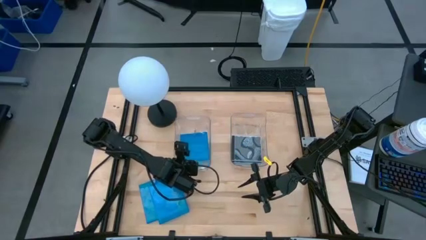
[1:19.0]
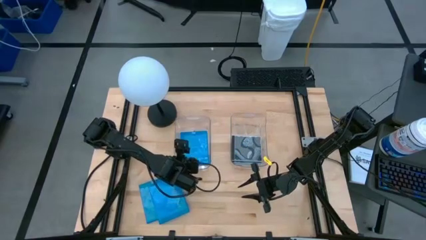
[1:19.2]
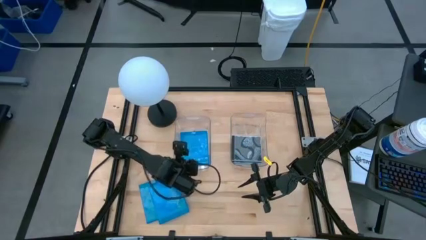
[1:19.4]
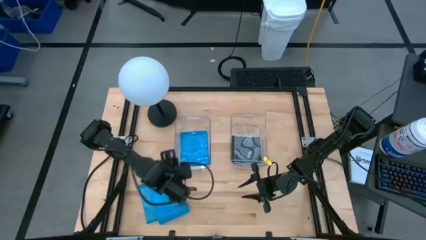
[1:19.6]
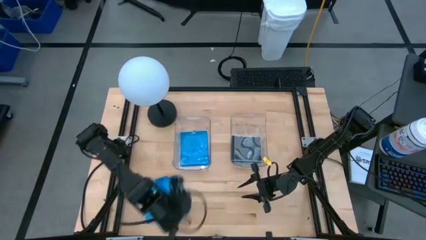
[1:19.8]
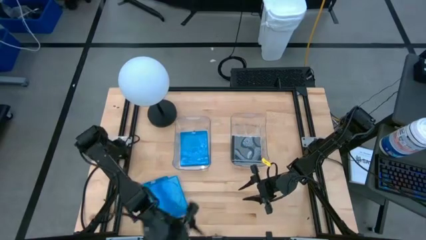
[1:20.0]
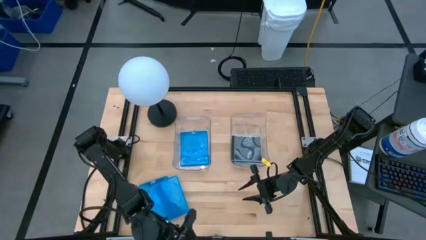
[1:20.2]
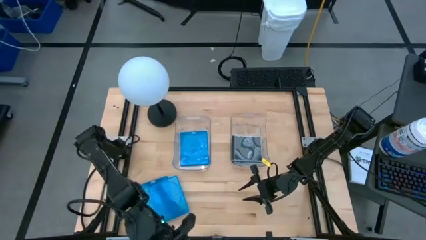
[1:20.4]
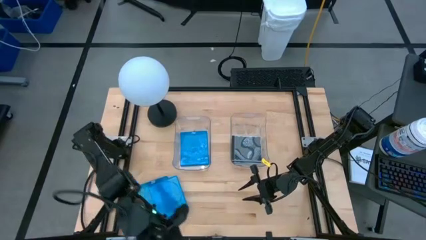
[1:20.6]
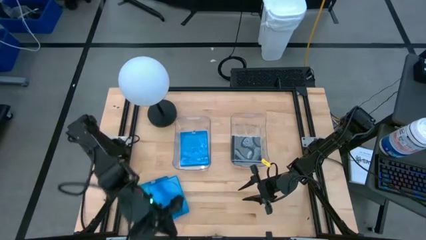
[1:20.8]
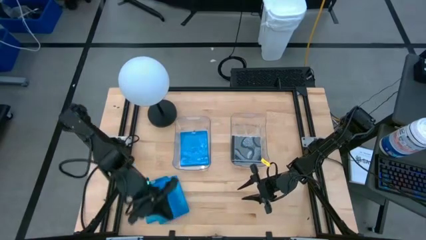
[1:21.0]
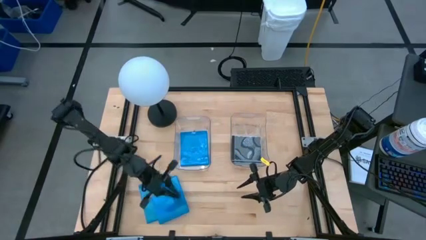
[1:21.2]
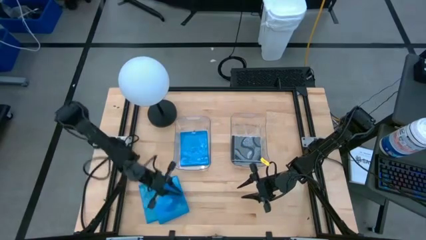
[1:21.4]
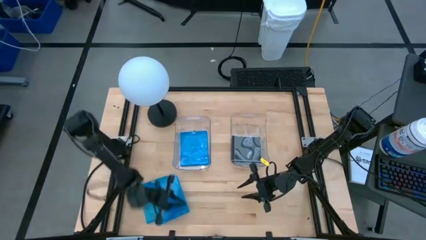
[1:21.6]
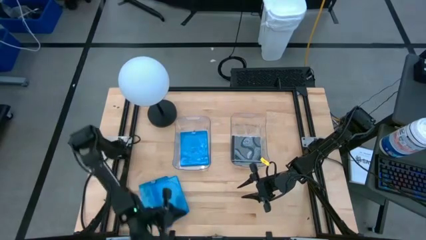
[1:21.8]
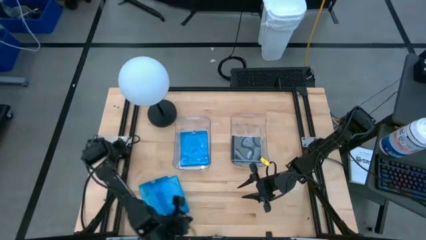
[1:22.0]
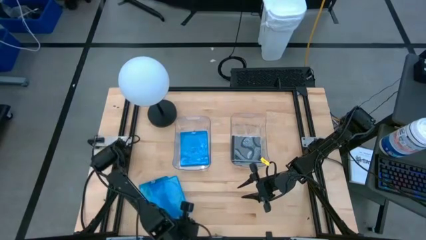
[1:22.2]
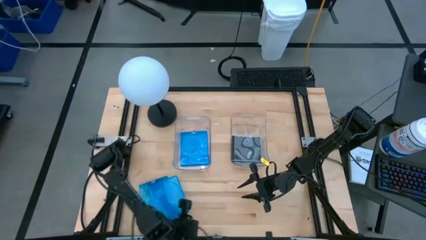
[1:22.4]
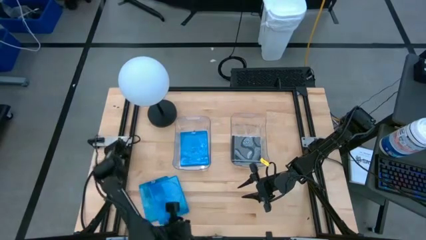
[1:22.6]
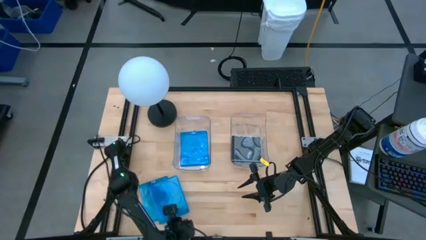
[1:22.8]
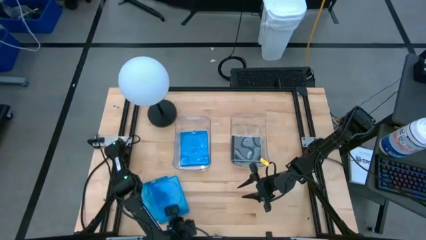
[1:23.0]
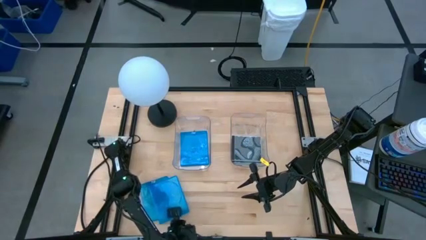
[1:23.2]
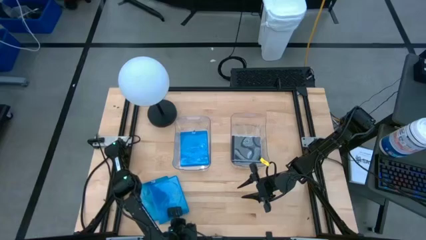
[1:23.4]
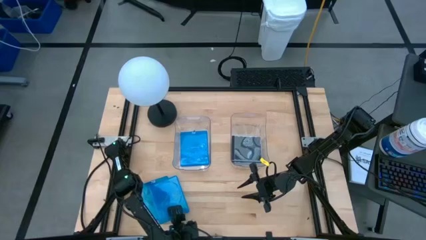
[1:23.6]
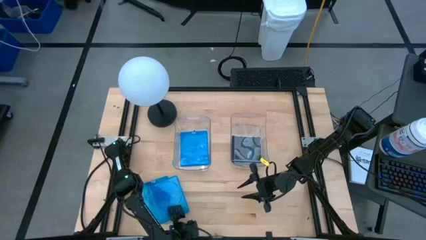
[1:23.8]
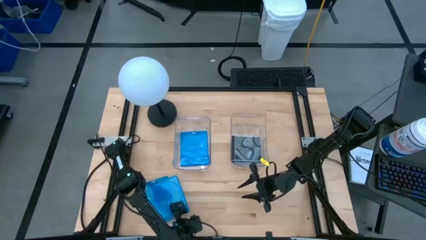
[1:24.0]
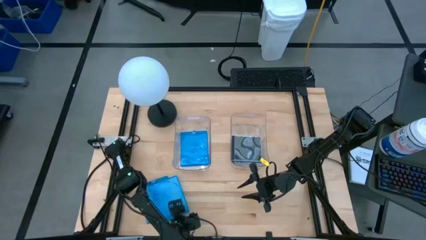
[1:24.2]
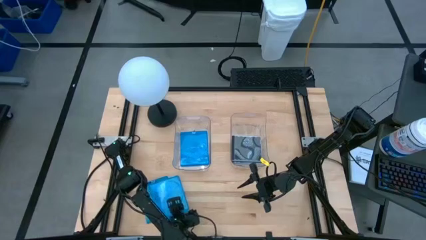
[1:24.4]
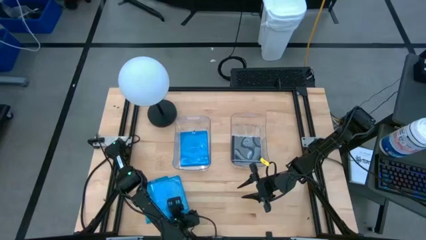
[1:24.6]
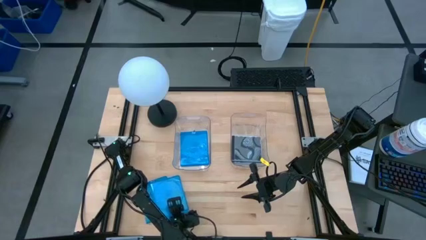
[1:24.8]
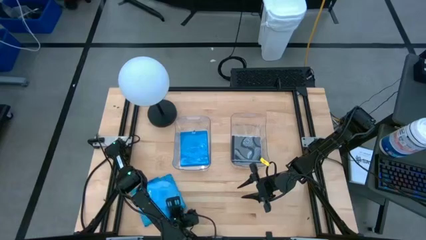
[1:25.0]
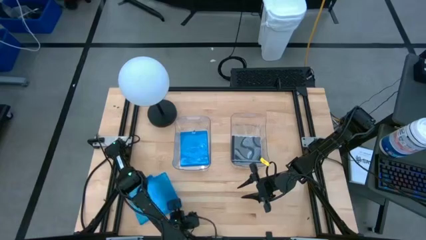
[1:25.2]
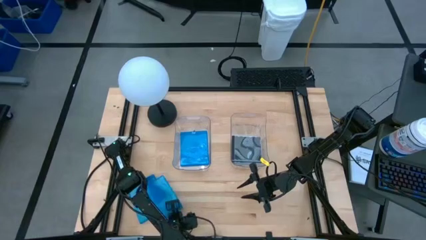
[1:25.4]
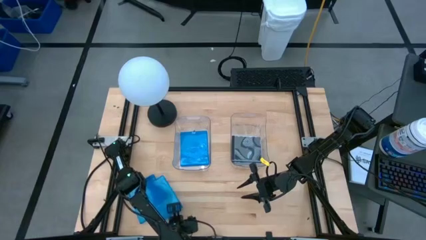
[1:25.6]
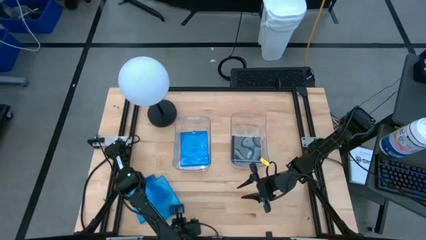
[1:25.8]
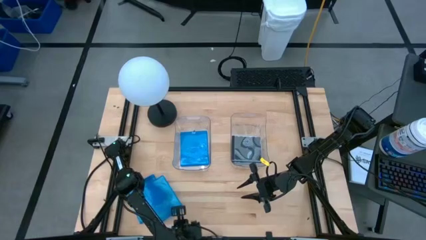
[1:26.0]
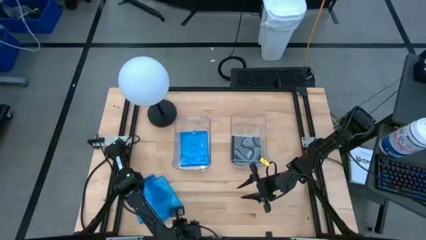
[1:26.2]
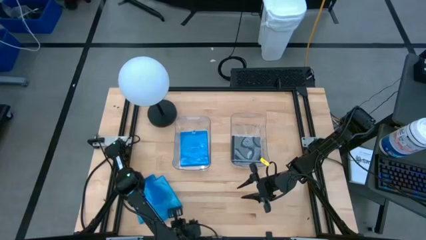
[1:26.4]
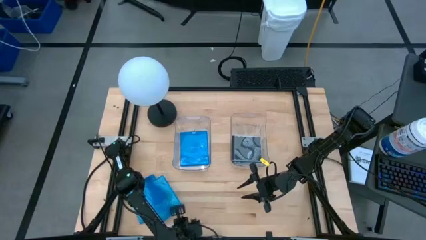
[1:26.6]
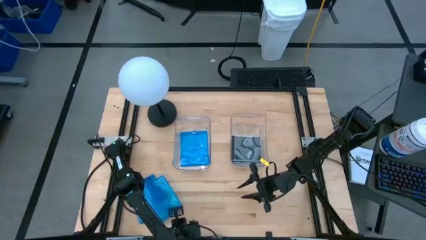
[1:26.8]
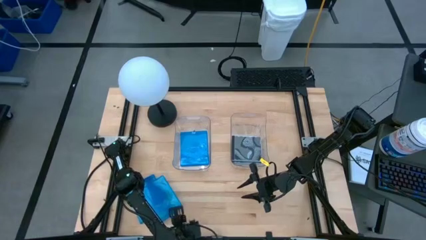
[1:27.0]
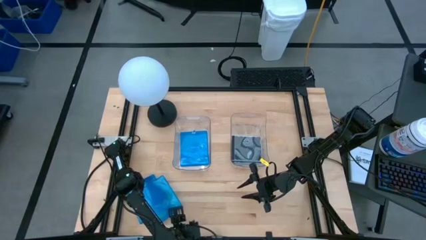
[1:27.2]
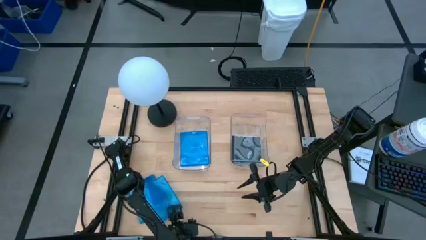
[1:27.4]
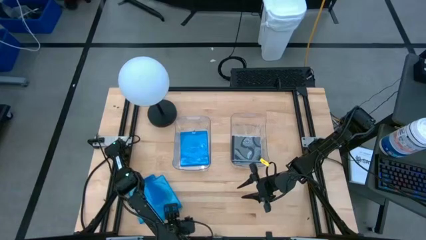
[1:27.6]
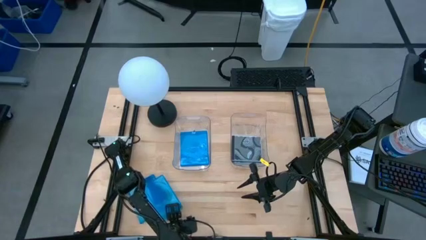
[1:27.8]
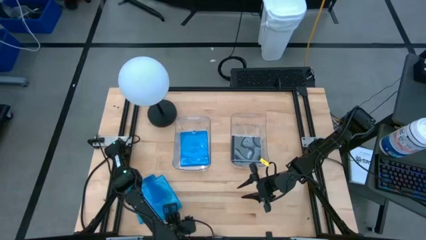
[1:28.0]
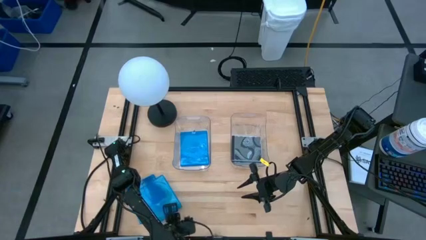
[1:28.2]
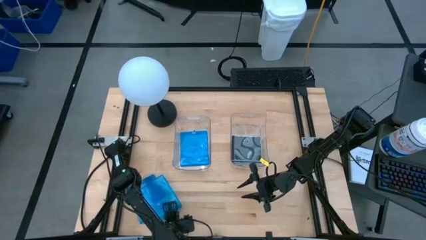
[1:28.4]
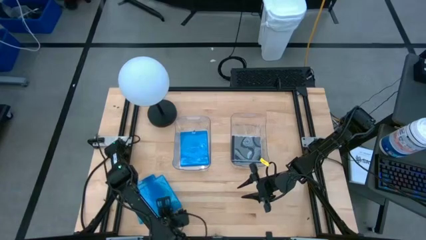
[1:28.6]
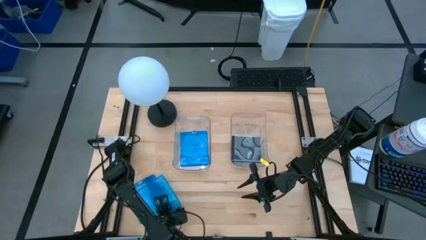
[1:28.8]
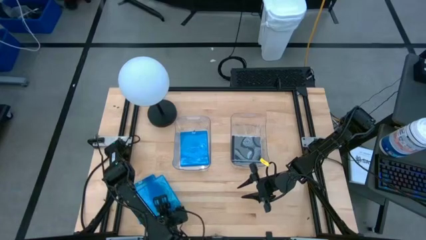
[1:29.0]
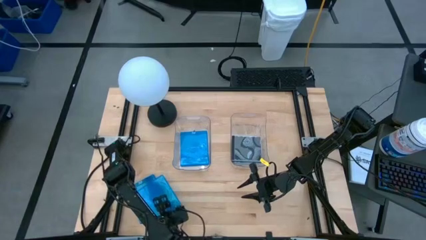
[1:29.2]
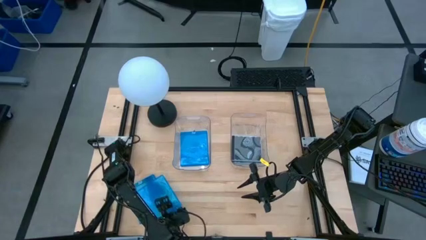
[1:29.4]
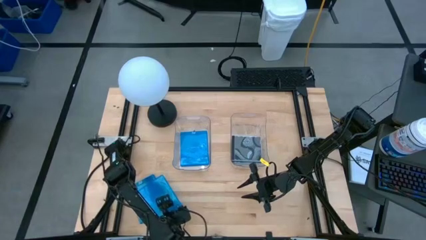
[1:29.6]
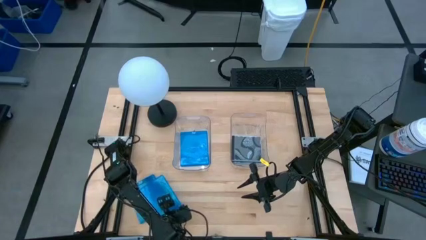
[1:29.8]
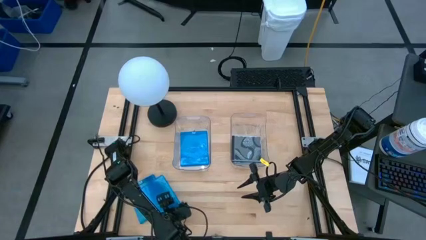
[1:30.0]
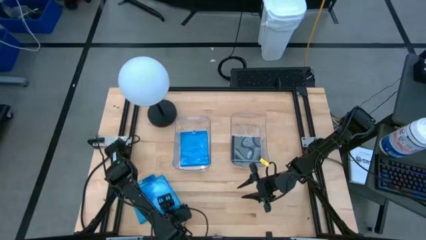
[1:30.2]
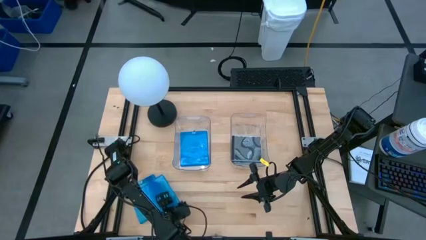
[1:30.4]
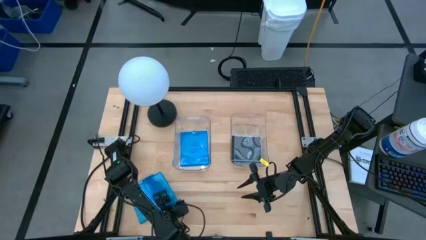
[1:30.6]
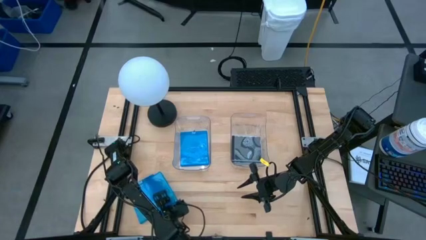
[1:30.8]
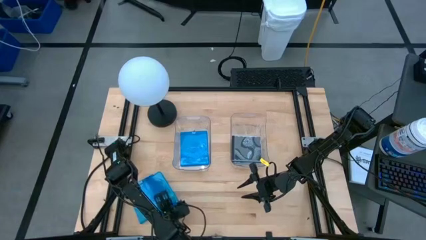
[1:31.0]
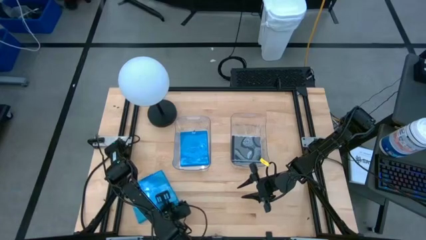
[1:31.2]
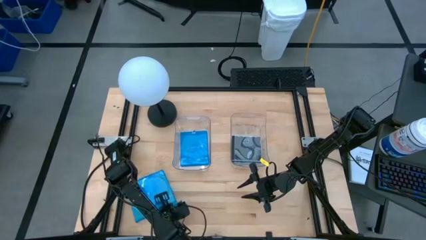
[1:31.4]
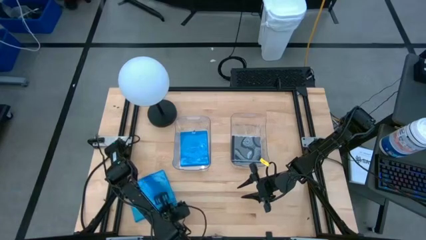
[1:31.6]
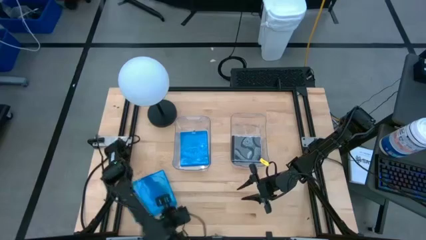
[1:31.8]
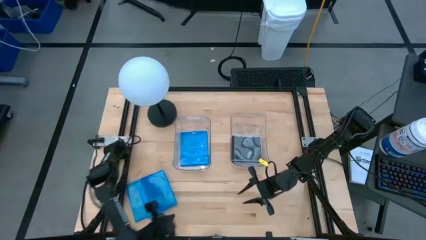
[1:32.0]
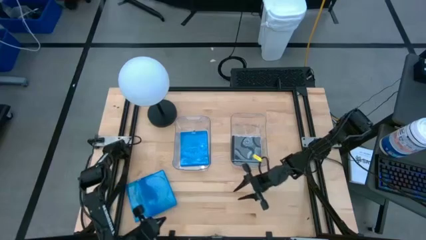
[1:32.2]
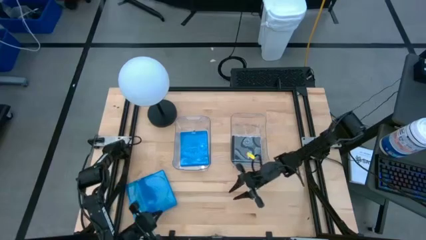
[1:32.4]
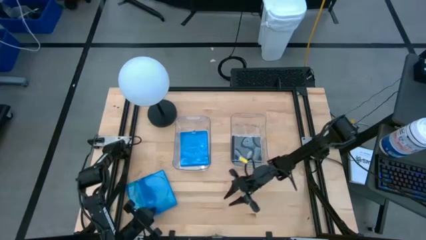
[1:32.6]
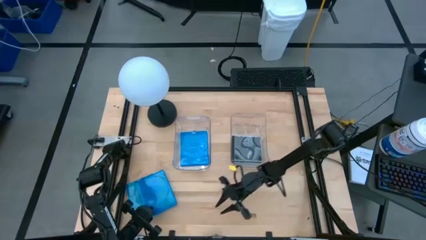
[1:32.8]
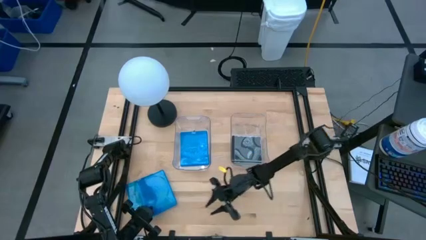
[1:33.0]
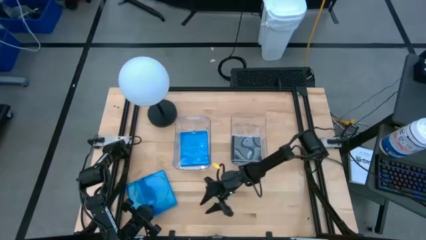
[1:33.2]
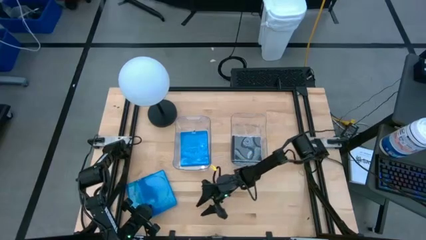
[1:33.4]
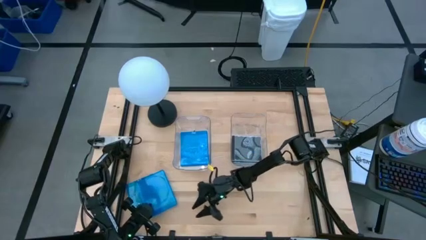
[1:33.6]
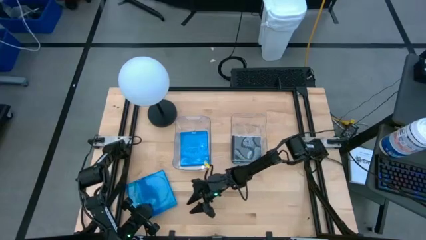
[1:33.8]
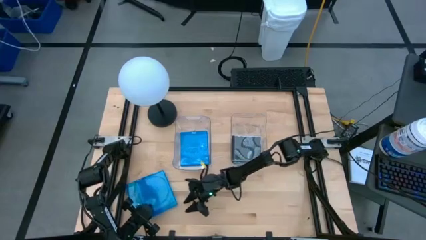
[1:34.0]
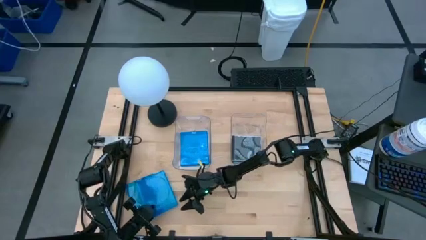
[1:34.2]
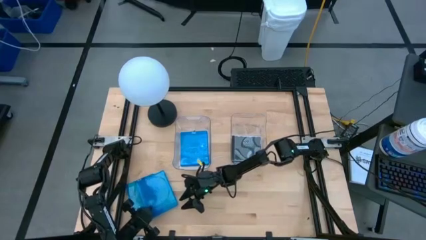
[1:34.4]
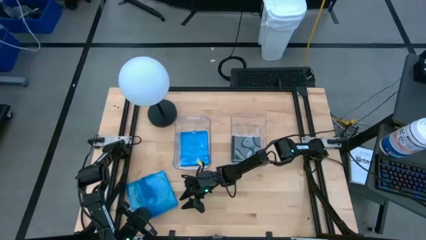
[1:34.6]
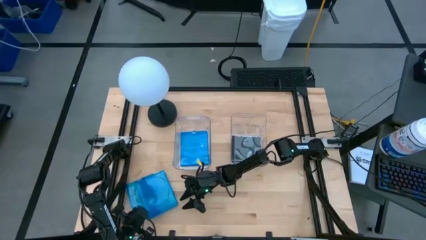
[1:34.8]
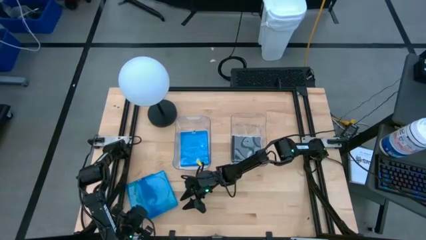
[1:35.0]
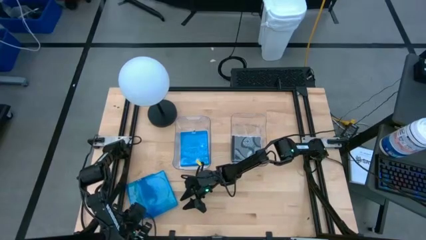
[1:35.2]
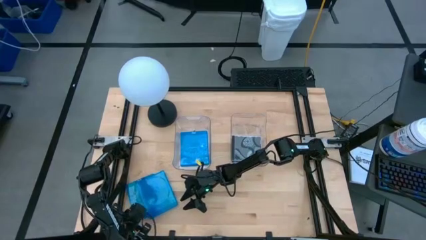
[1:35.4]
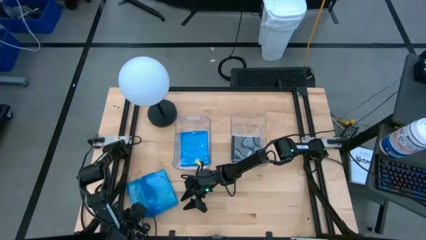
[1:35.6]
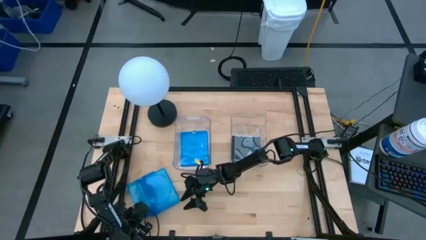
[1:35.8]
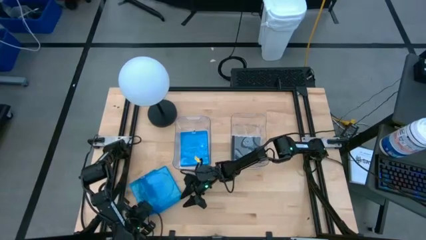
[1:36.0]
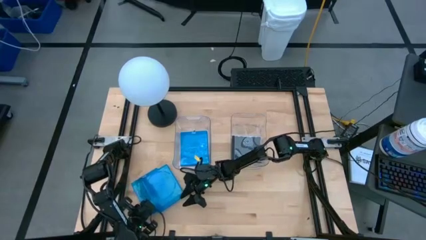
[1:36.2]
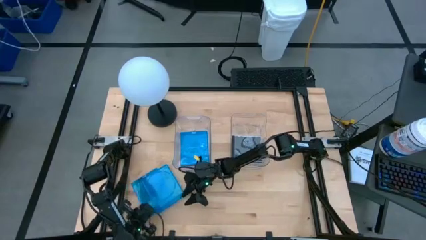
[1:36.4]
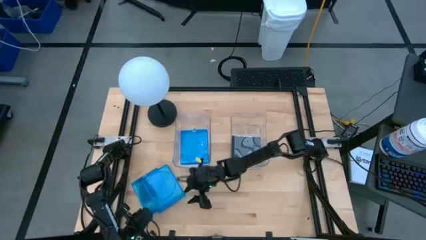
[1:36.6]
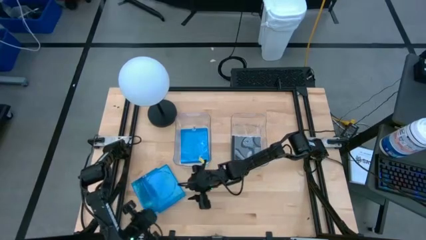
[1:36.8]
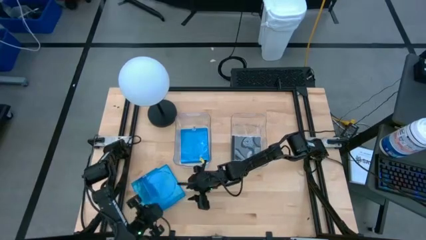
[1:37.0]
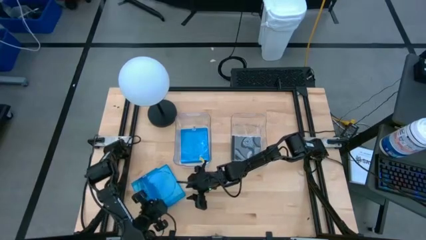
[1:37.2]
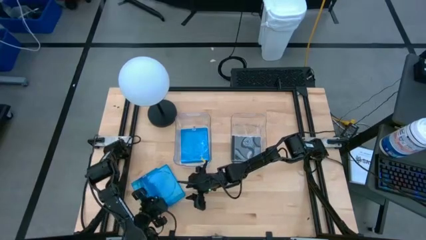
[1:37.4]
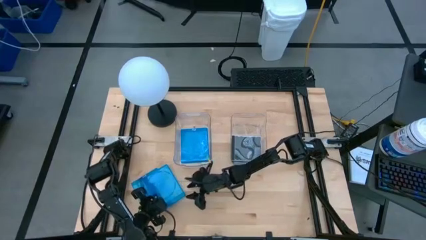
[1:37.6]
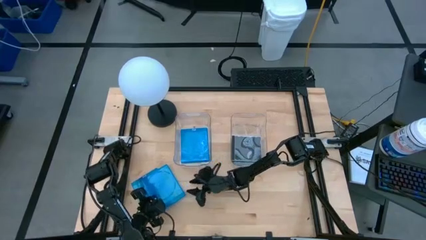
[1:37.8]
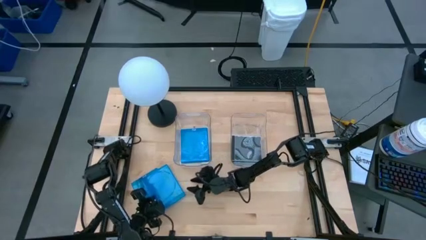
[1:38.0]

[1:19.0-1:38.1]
Task: Pick & place jewel cases by type
Put the blue CD case into the left transparent bin
